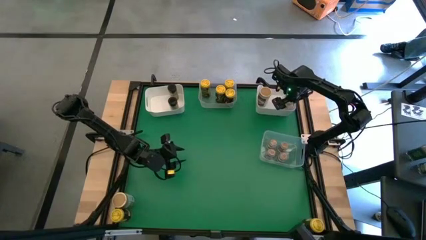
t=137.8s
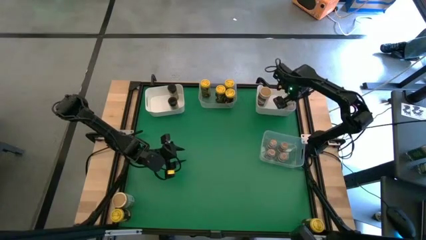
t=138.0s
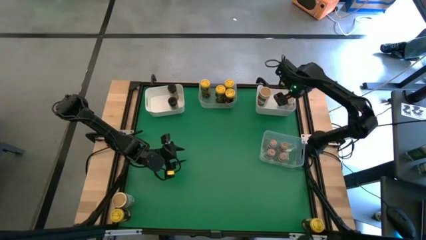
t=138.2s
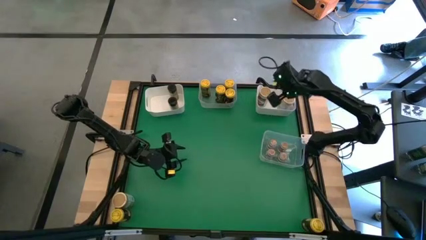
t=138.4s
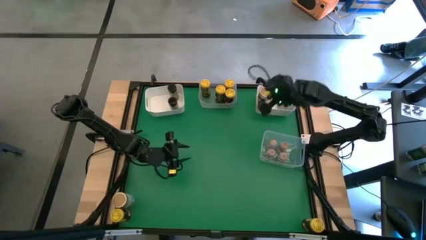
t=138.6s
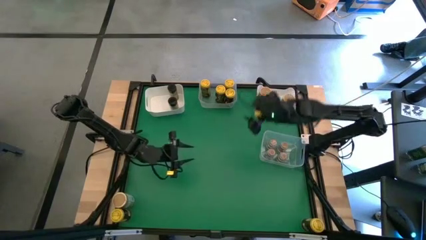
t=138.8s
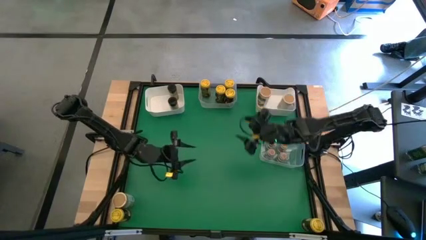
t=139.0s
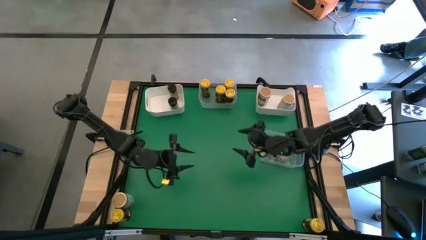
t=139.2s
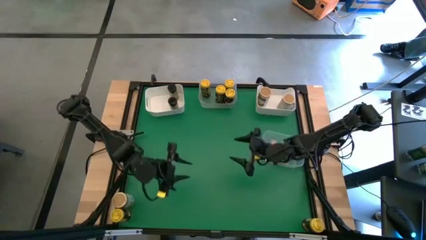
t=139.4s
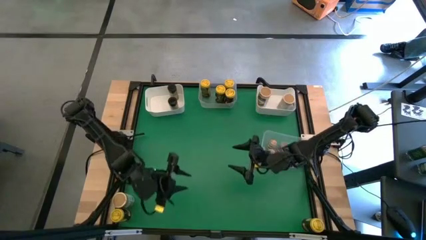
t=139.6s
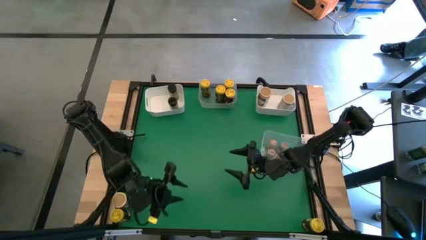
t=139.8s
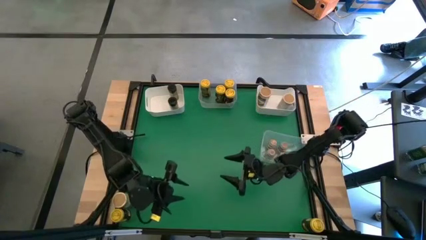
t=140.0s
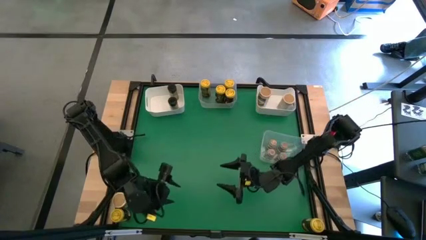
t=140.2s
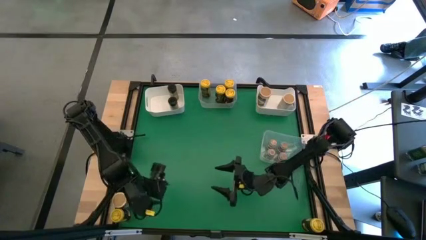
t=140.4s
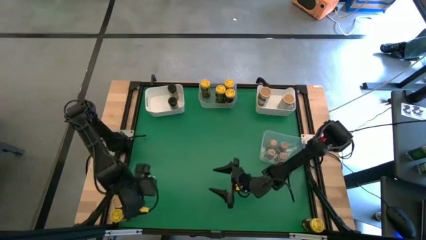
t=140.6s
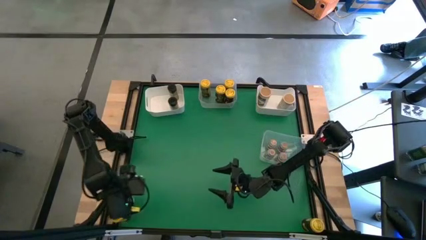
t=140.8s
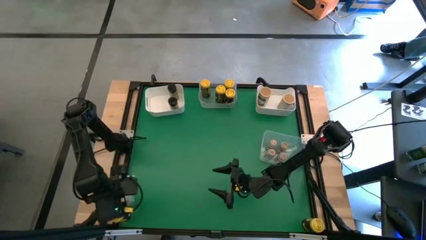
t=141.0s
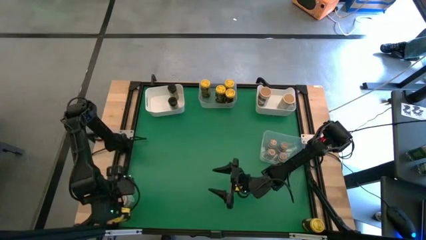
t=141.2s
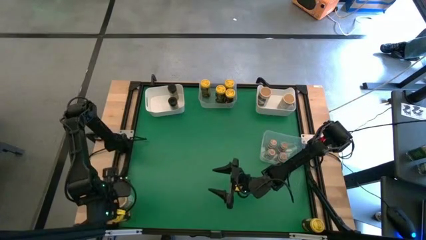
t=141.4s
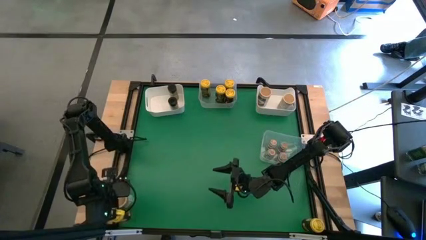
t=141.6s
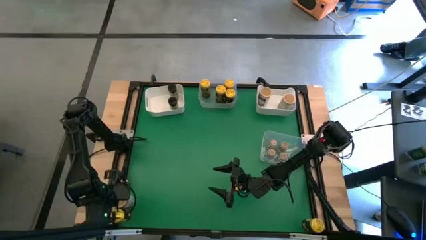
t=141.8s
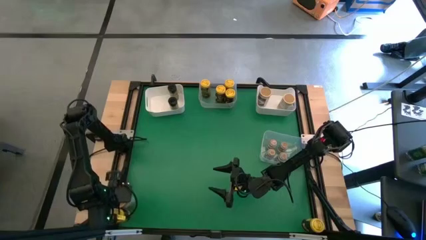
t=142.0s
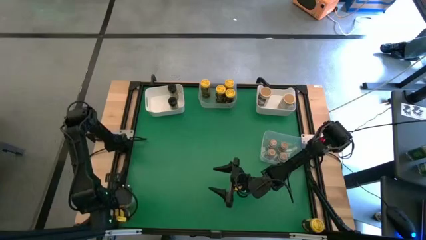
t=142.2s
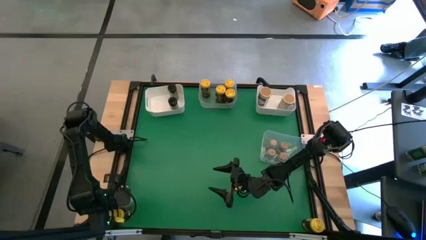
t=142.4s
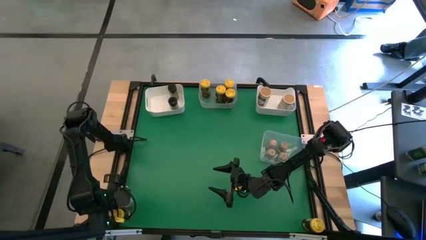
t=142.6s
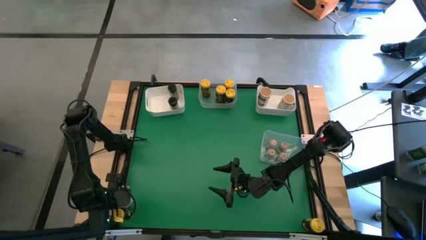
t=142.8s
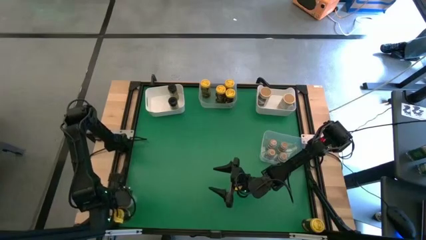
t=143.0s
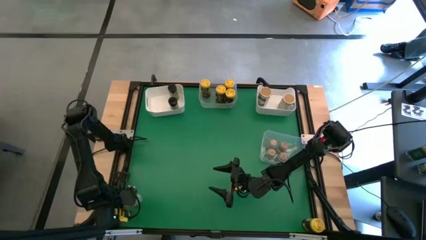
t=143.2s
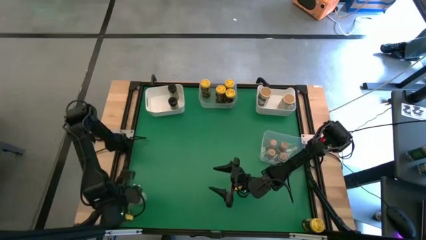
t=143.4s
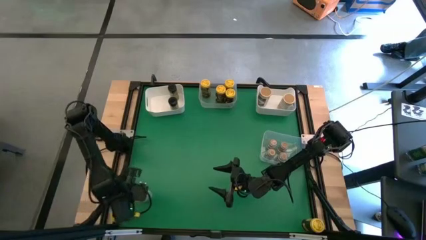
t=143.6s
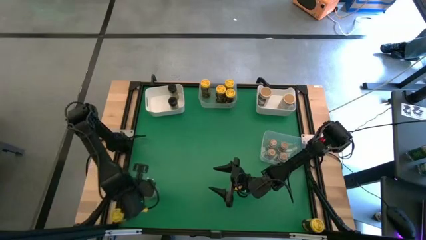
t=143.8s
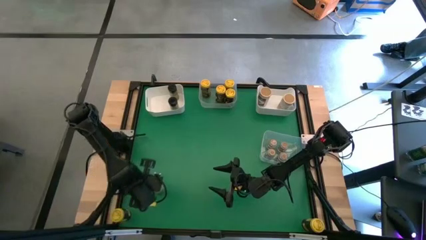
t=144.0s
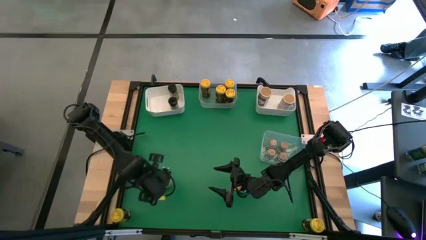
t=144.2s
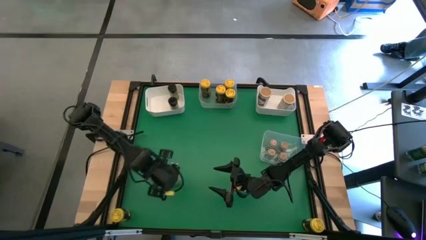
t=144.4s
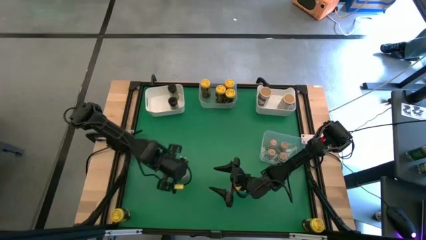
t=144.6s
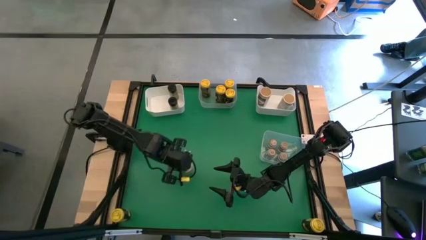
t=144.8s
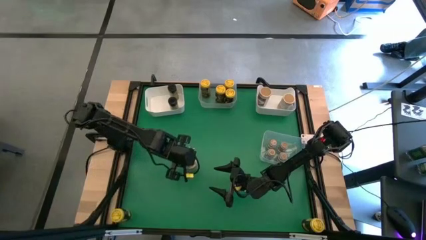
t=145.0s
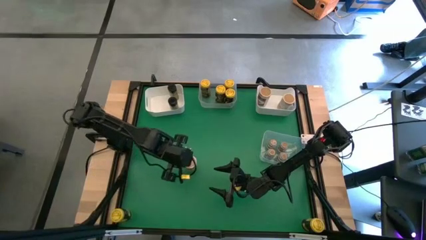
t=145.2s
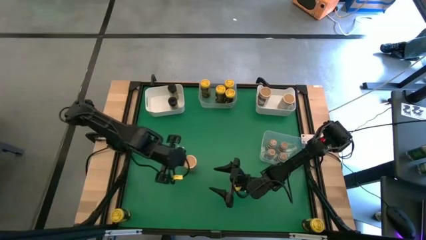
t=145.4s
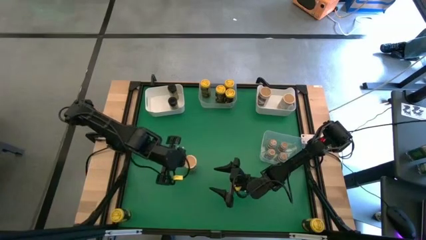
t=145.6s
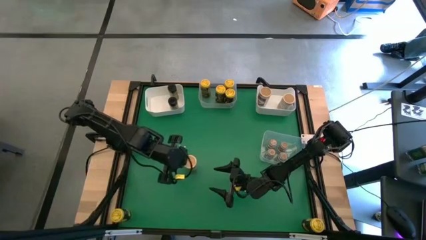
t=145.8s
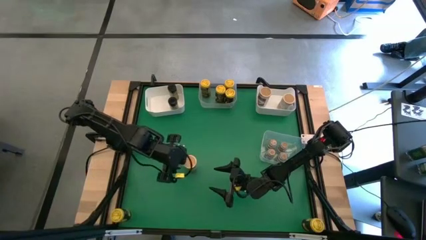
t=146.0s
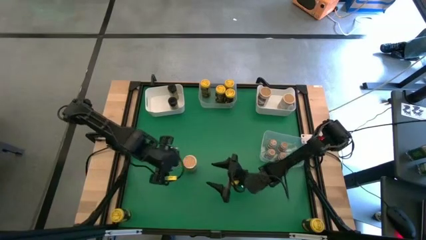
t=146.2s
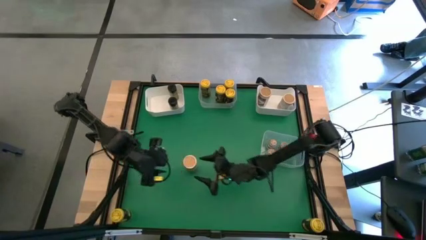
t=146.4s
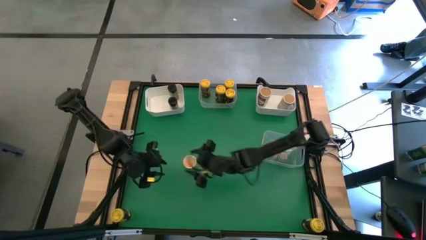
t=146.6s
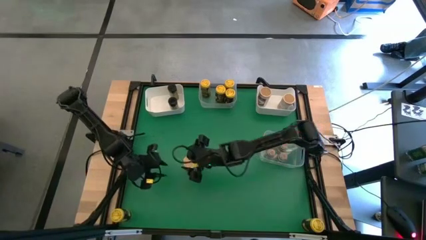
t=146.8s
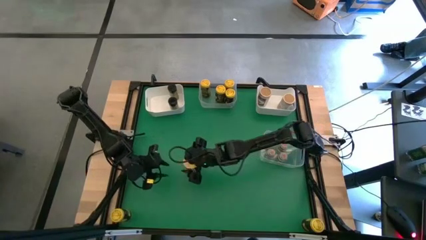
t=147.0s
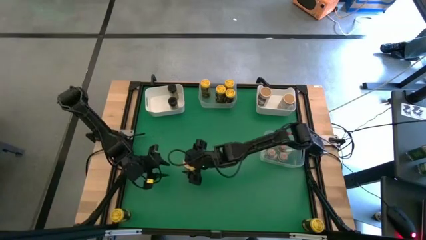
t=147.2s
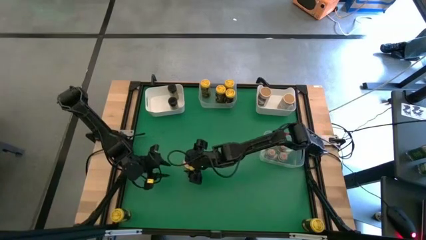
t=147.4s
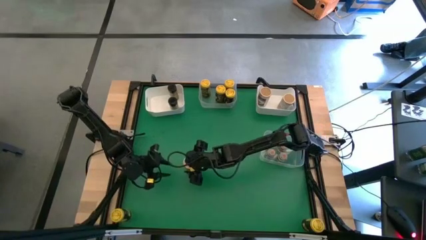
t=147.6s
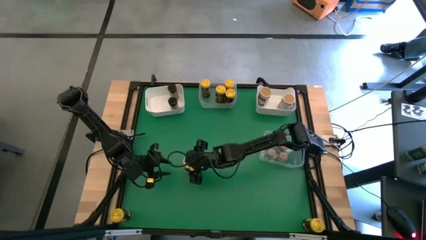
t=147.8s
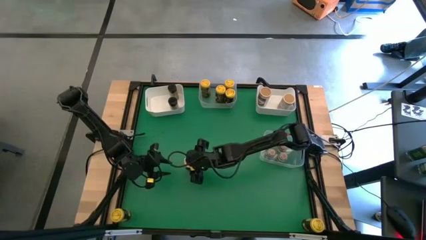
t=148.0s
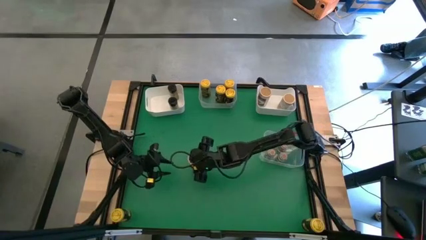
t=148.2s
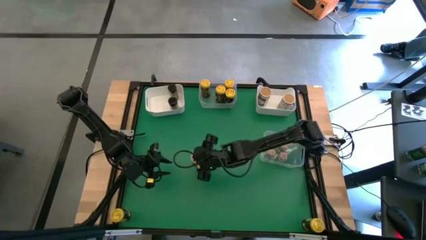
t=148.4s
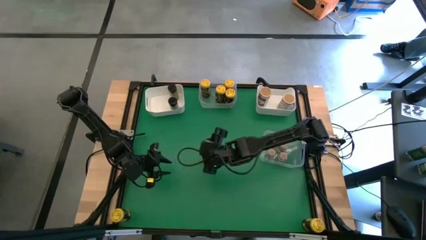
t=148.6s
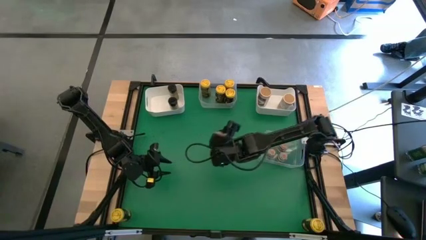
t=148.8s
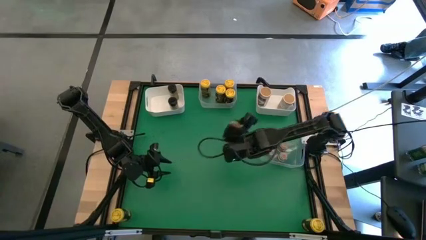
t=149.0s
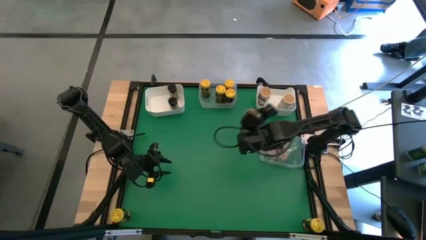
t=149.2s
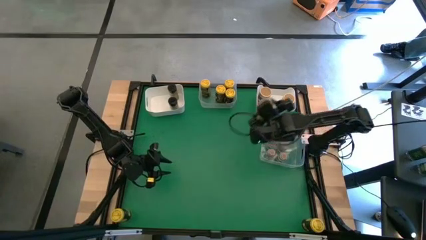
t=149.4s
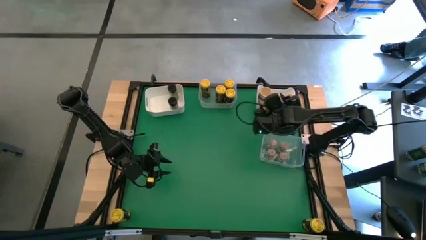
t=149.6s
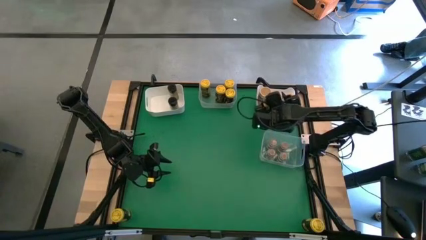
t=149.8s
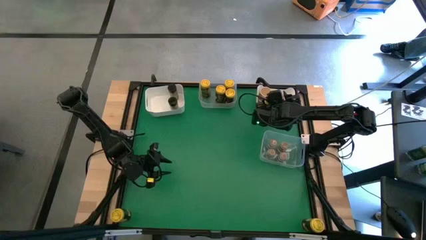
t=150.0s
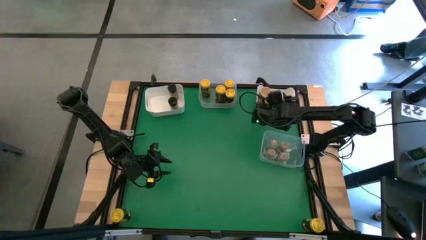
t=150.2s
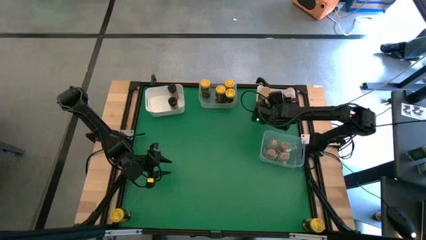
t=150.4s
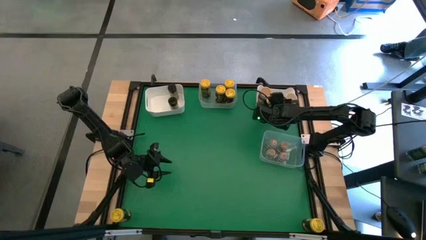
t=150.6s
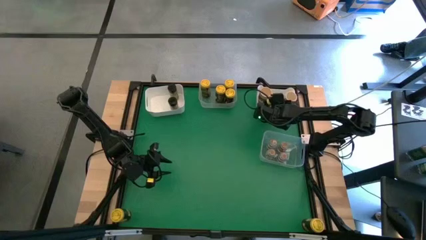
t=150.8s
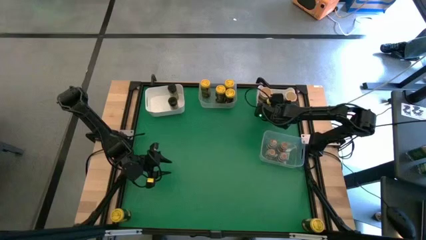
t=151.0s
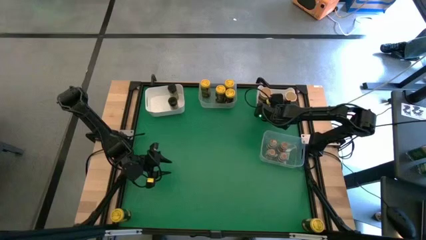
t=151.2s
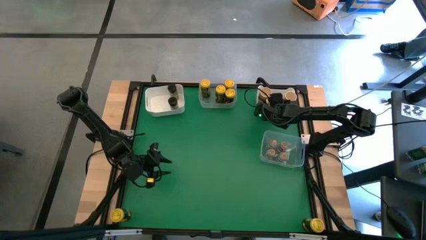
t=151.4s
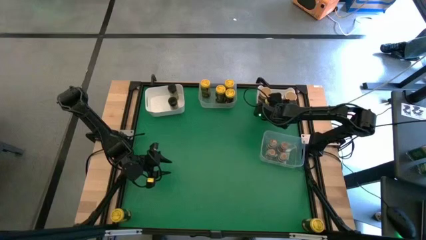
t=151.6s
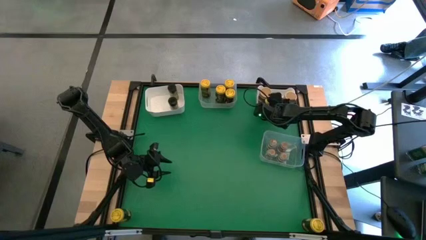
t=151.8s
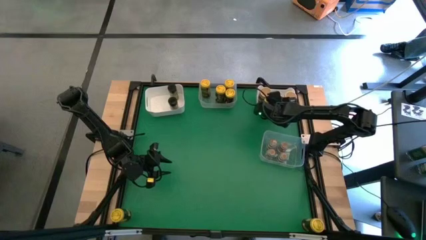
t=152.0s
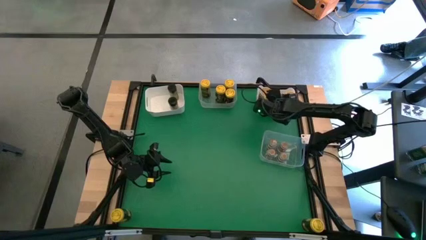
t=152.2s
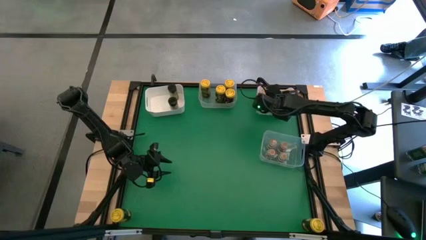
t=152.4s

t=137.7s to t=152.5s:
Task: Sort spices by type
Put the brown seasoning bottle into the right white bin
